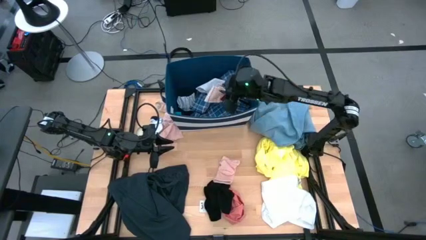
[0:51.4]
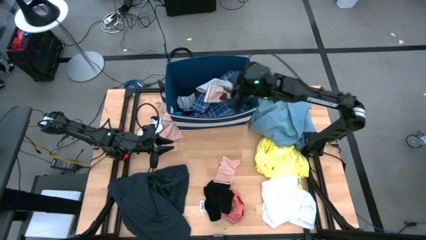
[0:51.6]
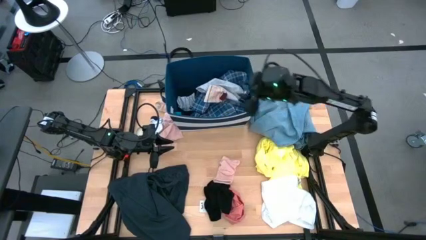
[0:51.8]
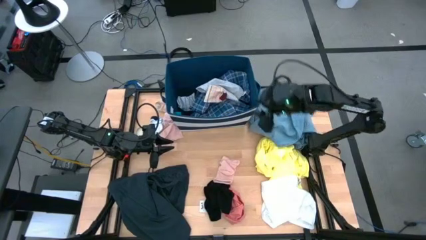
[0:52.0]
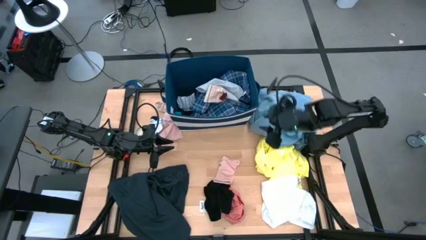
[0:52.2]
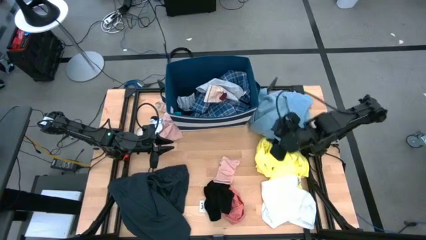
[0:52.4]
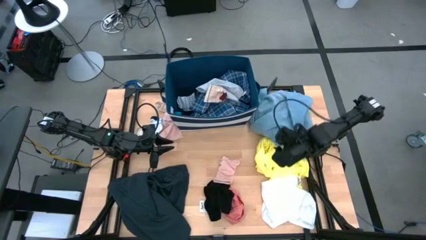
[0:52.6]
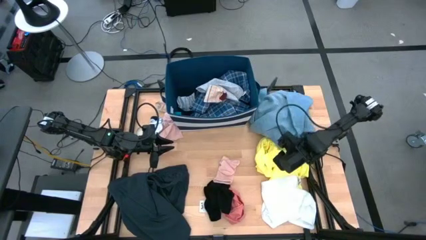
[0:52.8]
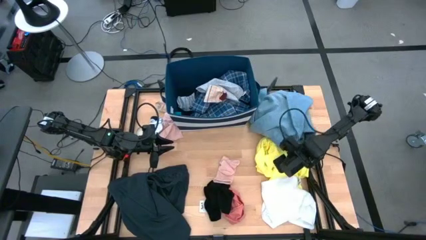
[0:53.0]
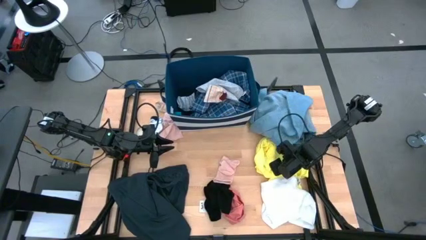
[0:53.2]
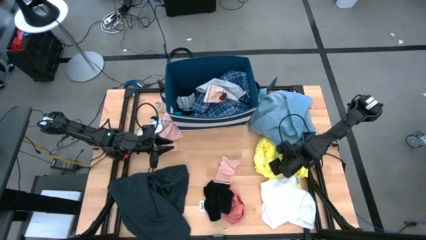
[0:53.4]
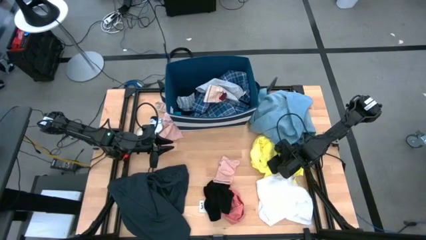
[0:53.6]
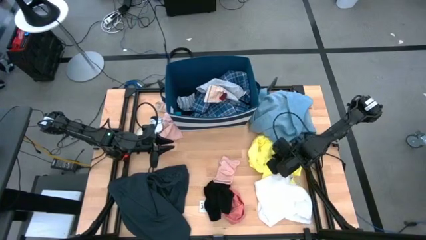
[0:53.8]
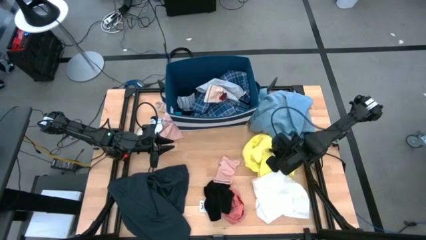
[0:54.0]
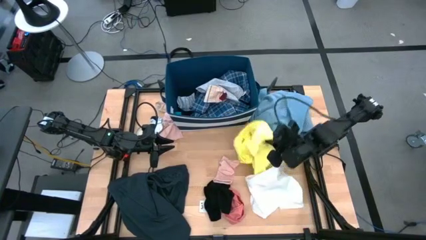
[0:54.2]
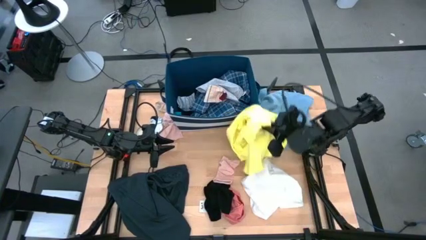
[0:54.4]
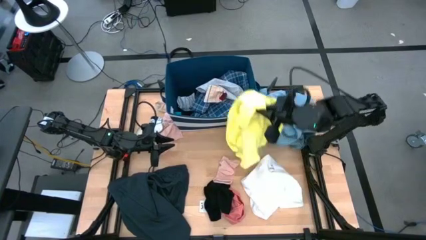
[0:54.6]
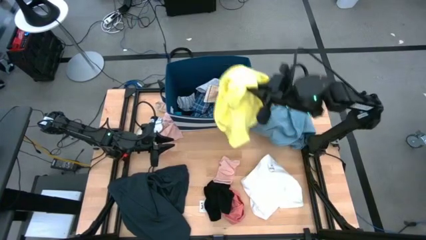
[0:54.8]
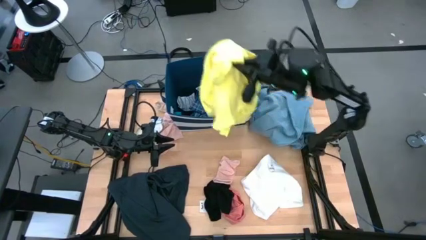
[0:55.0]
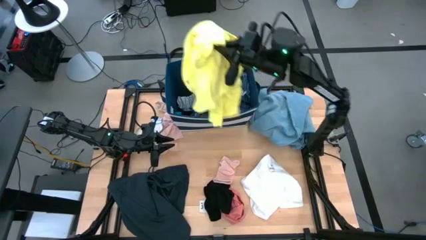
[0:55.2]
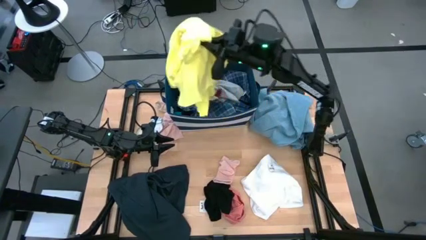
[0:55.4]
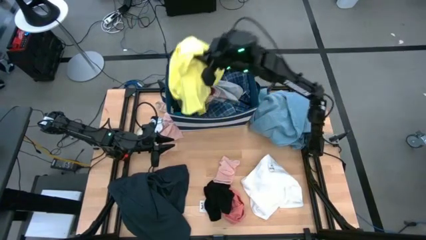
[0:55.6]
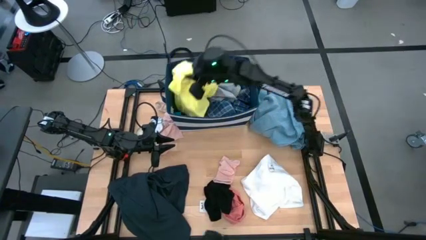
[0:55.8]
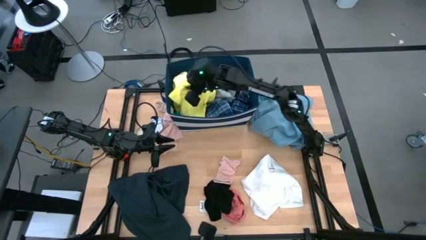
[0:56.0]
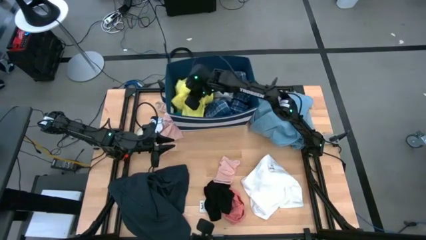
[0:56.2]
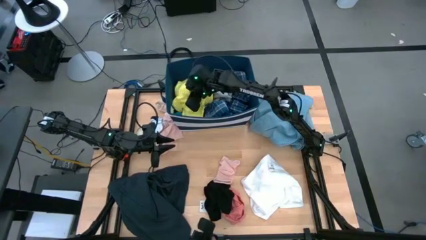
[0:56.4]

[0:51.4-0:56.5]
Task: Sort clothes
Put the yellow shirt into the blue laundry organizer

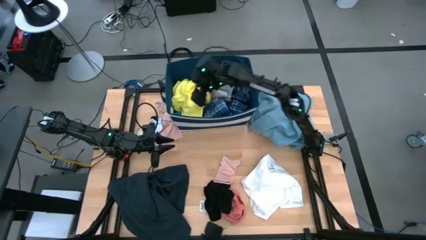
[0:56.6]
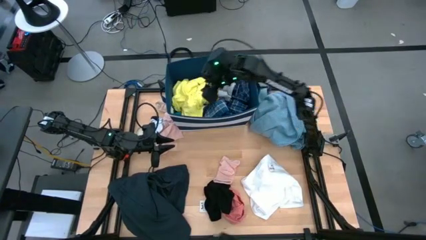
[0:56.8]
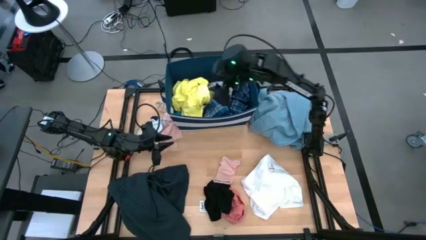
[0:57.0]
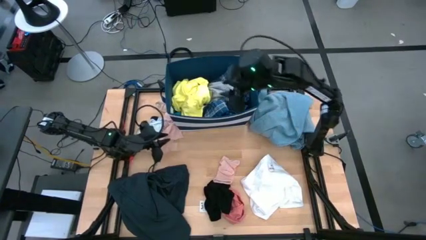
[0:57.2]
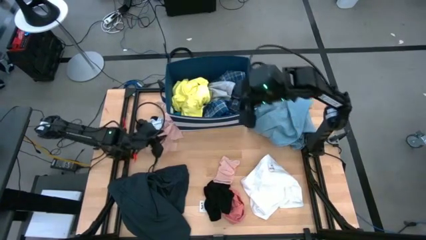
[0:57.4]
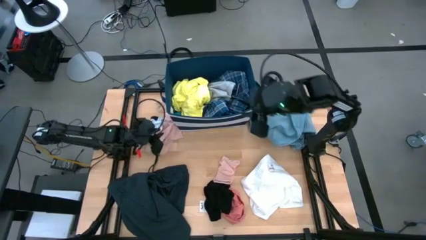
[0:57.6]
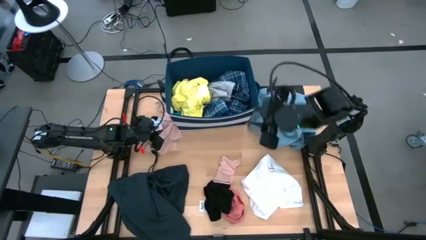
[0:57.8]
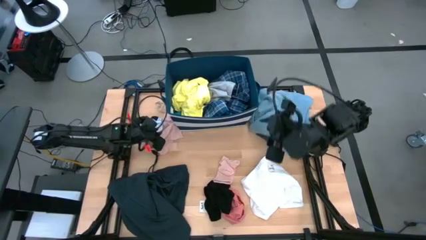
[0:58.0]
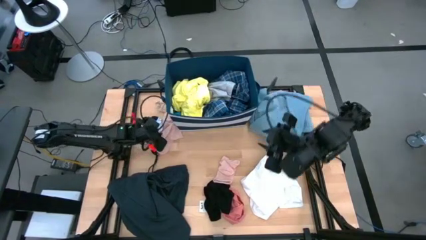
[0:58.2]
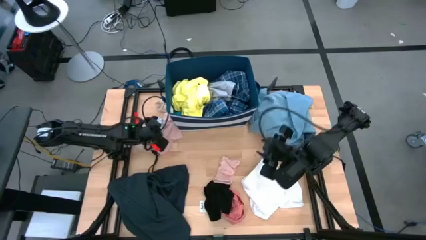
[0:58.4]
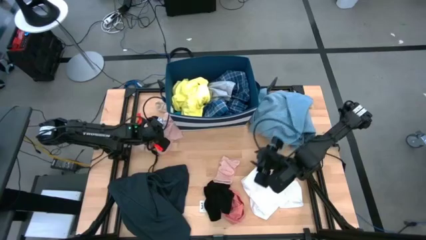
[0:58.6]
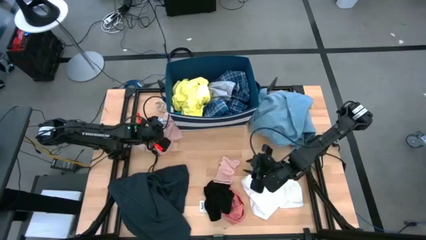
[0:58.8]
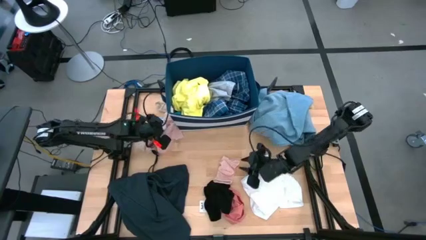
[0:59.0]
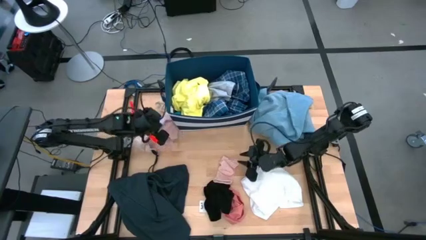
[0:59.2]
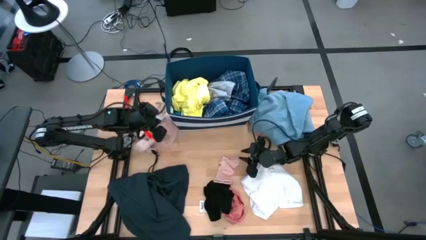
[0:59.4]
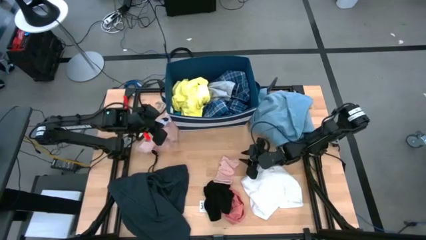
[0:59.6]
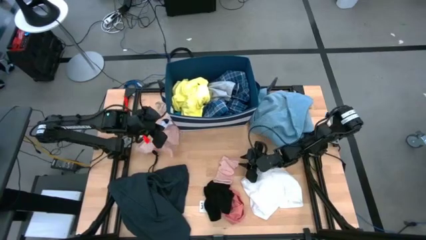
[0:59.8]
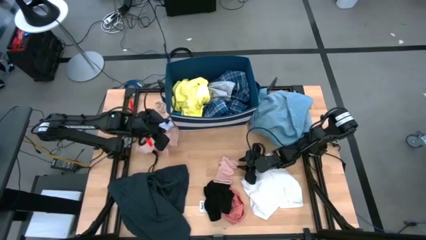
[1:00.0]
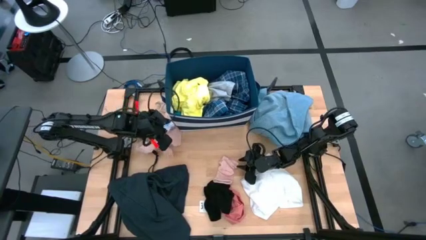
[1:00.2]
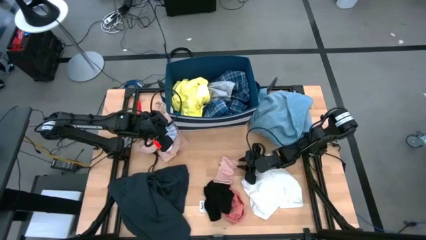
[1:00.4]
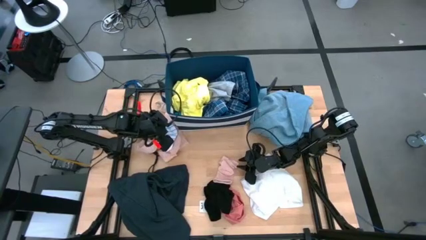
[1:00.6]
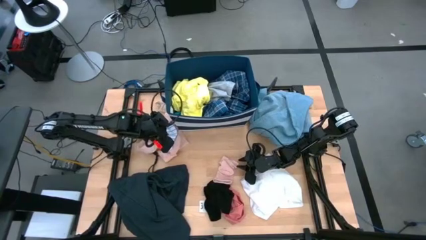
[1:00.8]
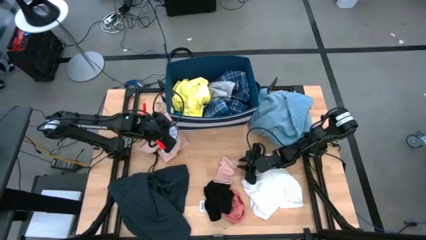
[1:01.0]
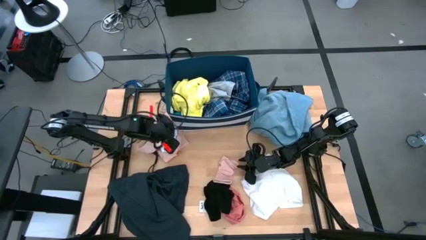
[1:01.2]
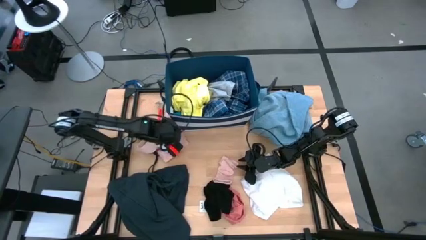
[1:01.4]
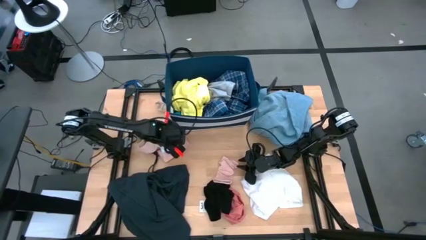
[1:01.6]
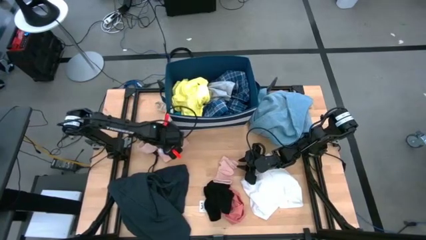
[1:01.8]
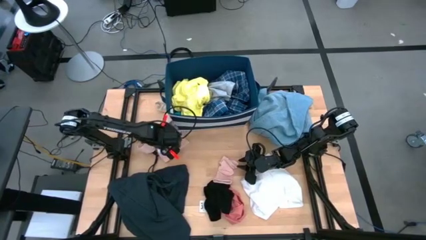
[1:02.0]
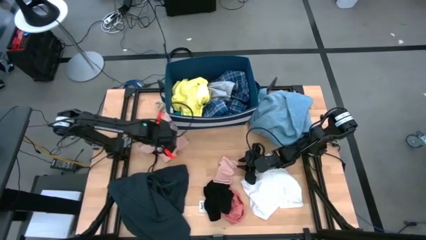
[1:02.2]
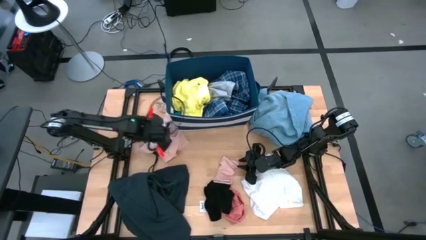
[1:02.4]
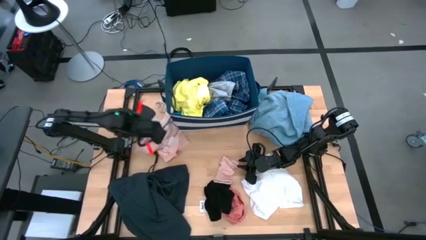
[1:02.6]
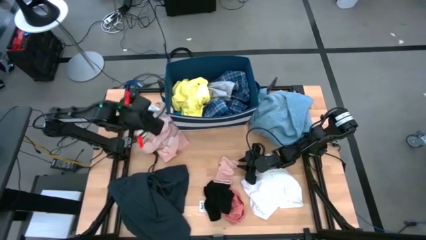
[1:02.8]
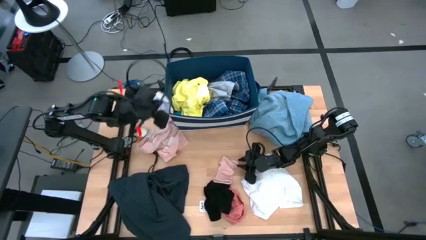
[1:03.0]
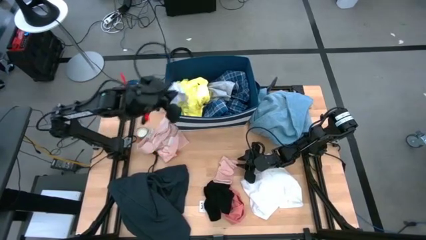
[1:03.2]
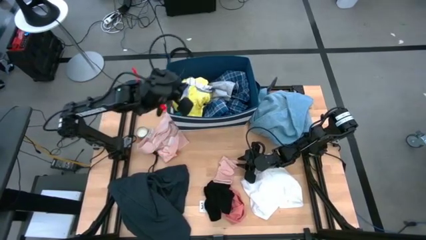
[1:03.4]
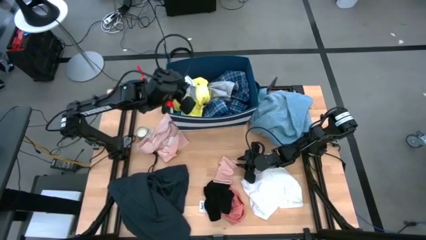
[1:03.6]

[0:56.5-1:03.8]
Put the white stripe sock into the blue laundry organizer

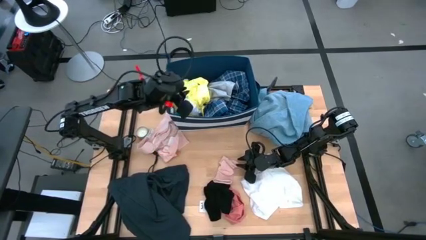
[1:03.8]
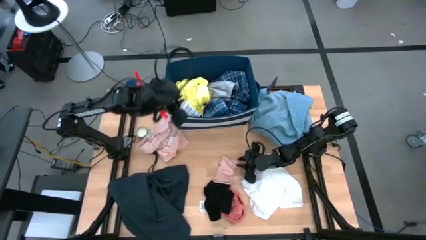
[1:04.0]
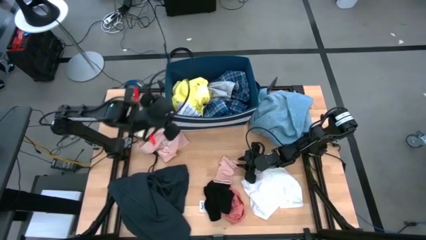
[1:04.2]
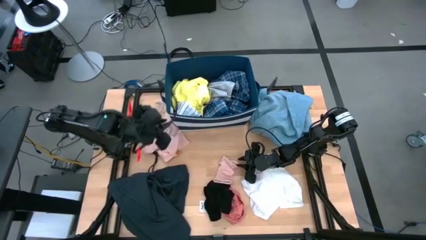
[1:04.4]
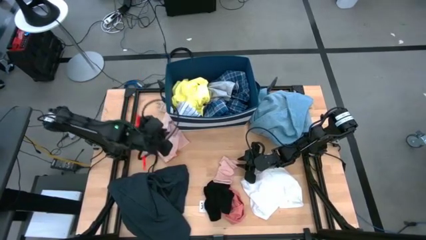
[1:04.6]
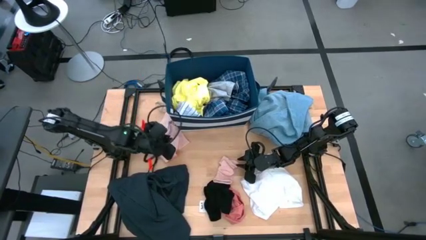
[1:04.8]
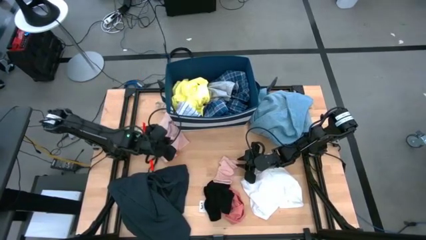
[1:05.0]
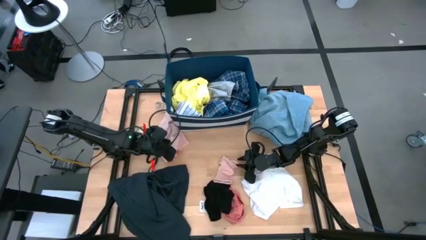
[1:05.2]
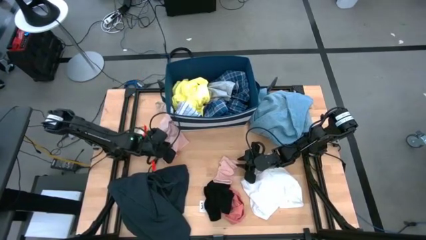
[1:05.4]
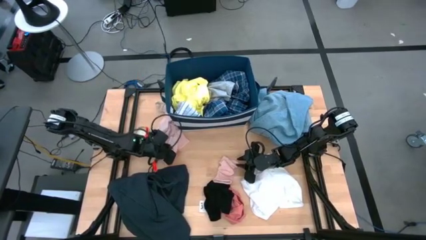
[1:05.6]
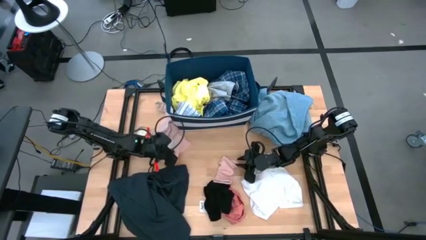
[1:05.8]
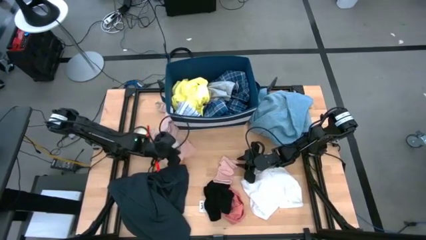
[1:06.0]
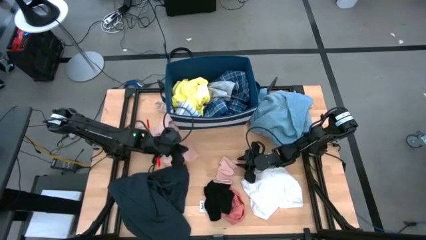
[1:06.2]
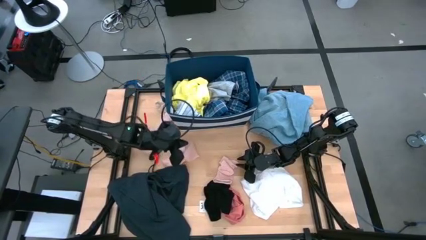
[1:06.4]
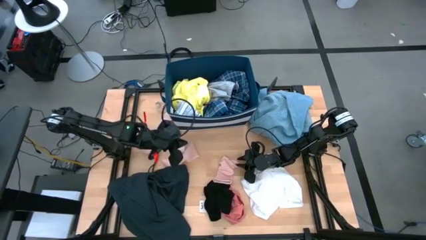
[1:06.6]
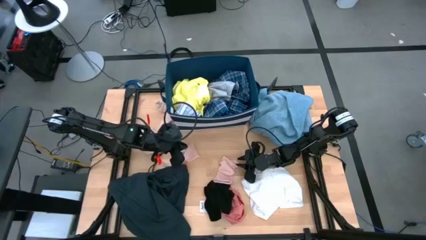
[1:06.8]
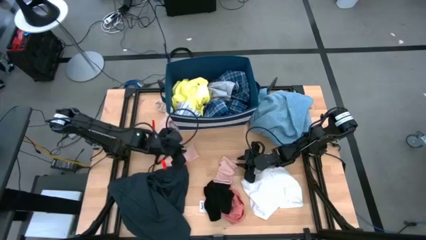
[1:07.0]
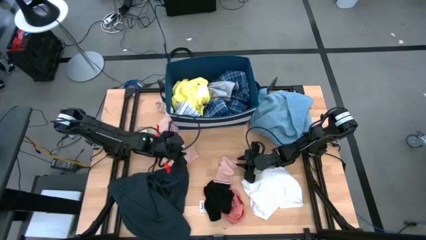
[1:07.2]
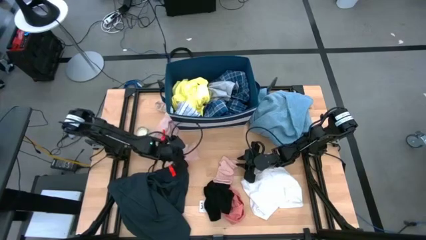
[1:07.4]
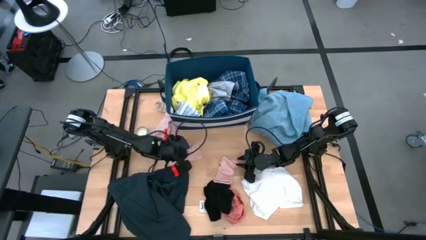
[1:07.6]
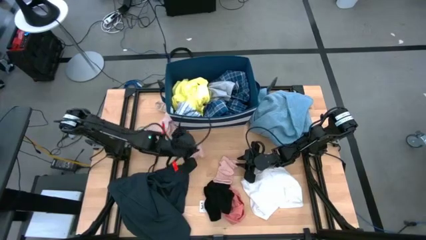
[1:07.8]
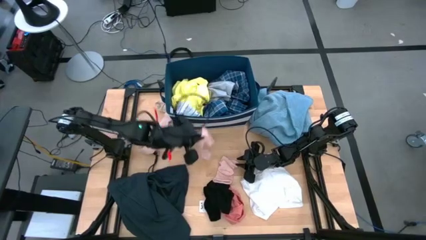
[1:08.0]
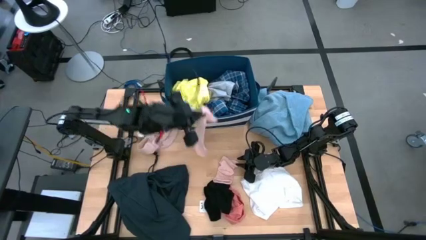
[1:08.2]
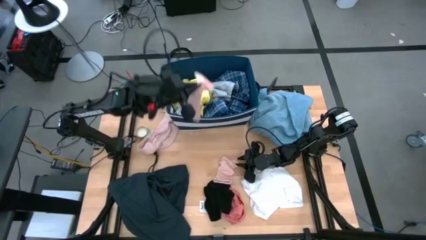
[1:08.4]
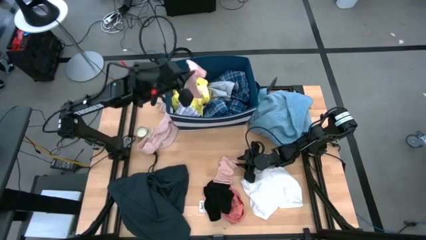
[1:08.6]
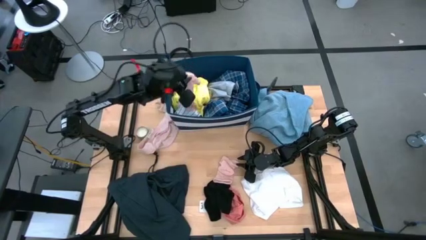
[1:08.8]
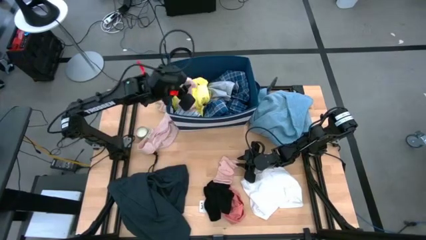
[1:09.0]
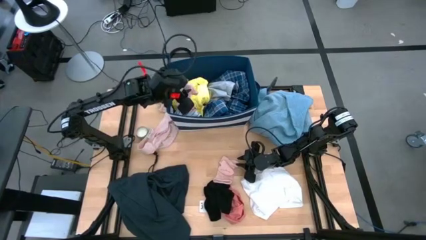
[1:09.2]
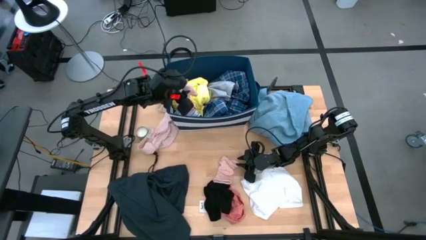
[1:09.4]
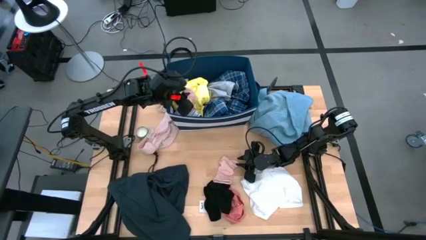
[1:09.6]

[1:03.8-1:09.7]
Put the pink sock into the blue laundry organizer
